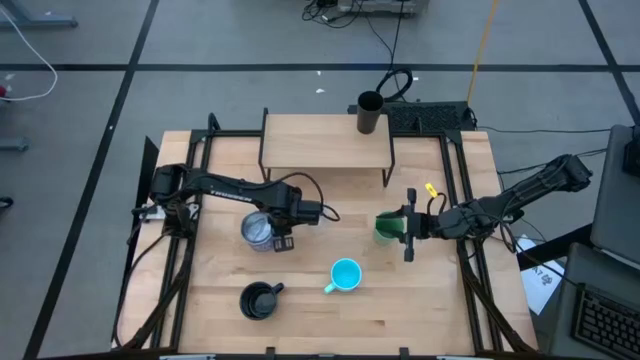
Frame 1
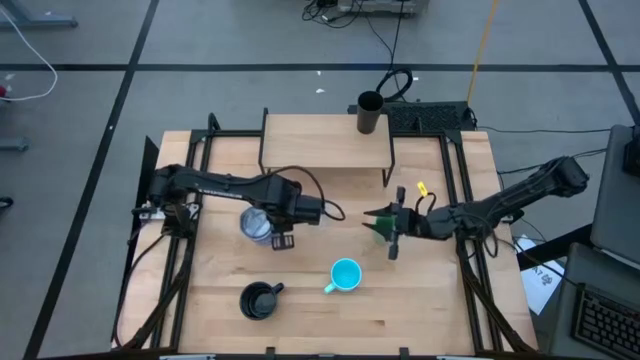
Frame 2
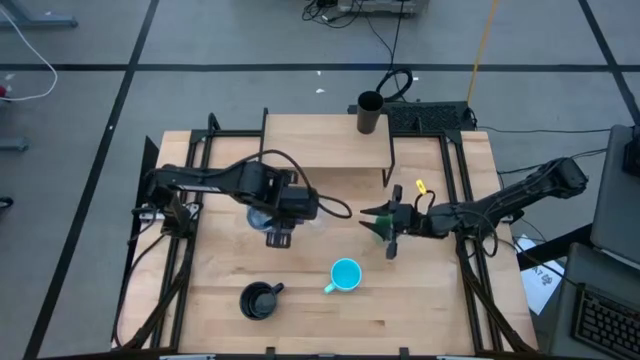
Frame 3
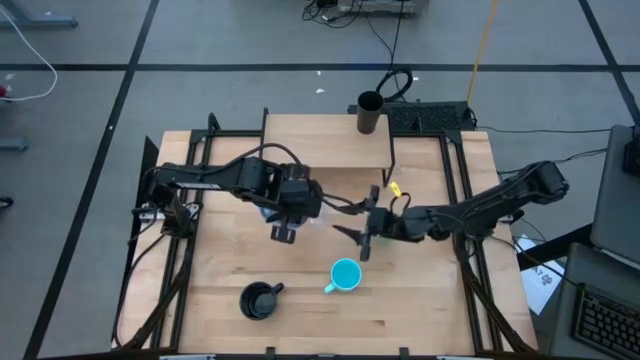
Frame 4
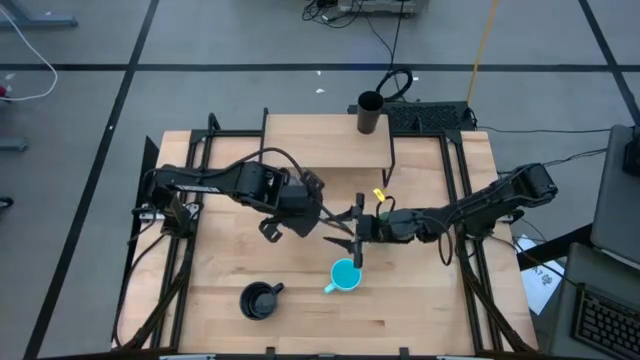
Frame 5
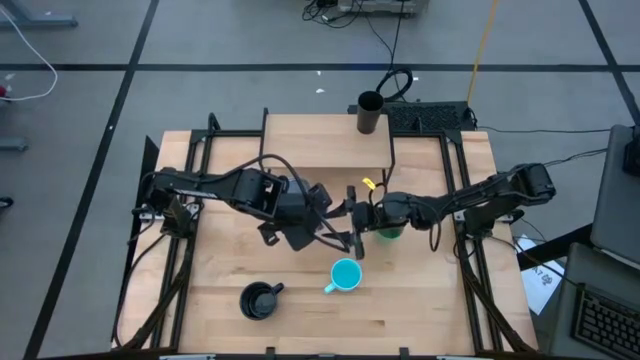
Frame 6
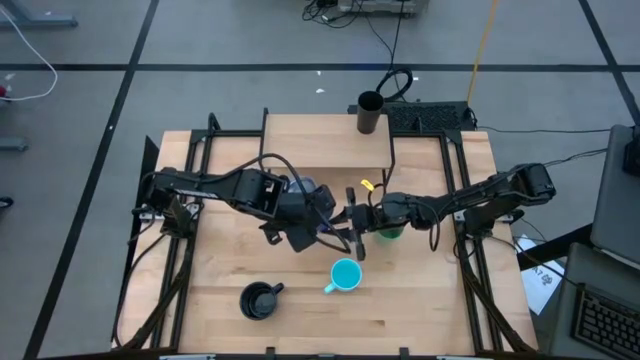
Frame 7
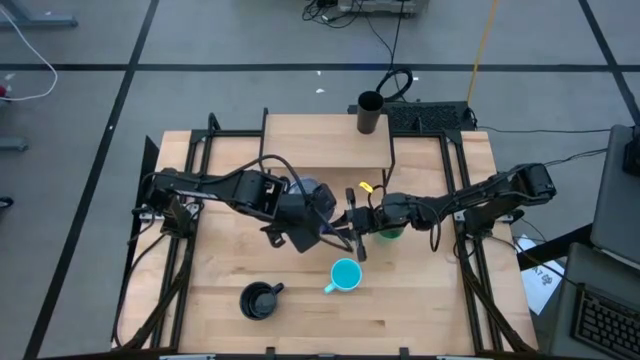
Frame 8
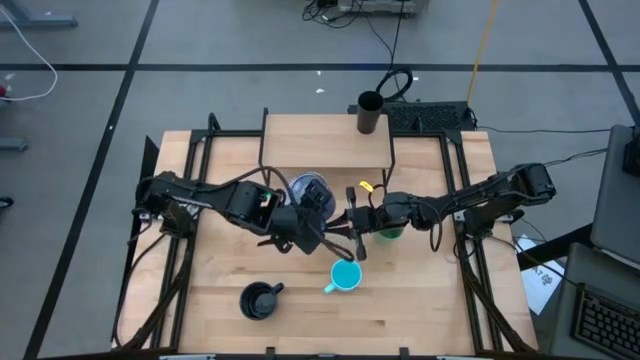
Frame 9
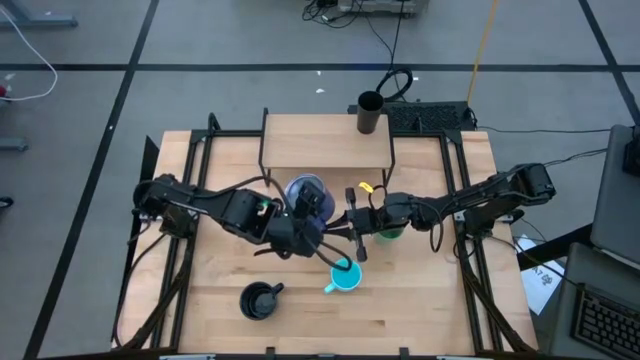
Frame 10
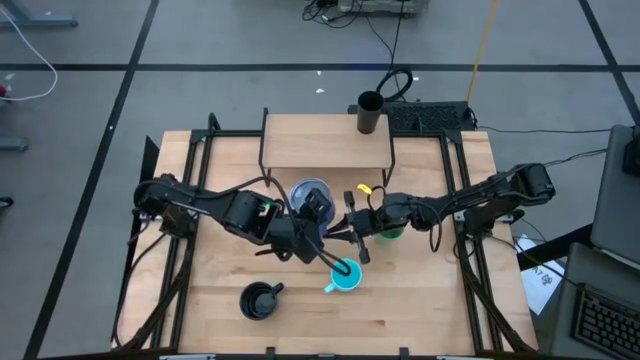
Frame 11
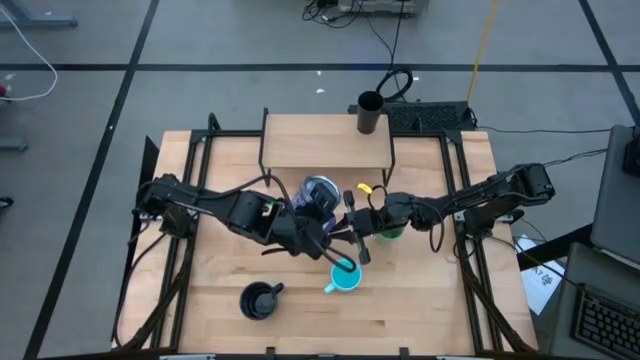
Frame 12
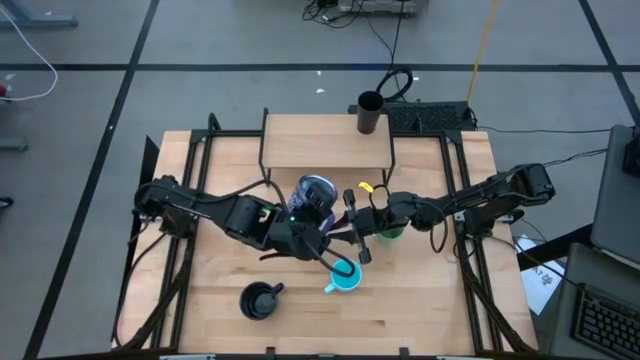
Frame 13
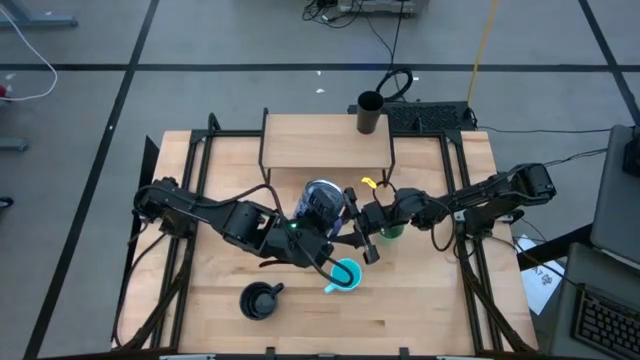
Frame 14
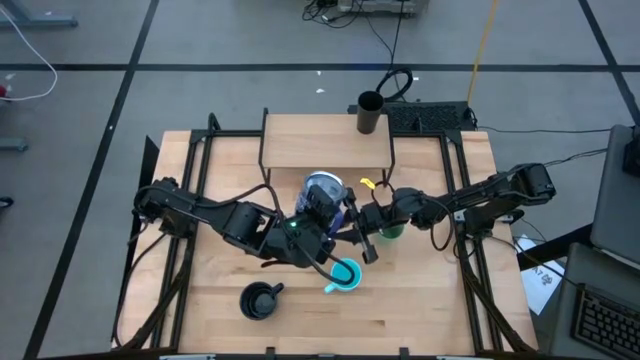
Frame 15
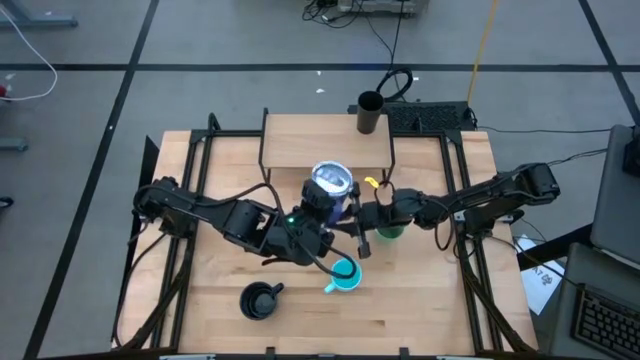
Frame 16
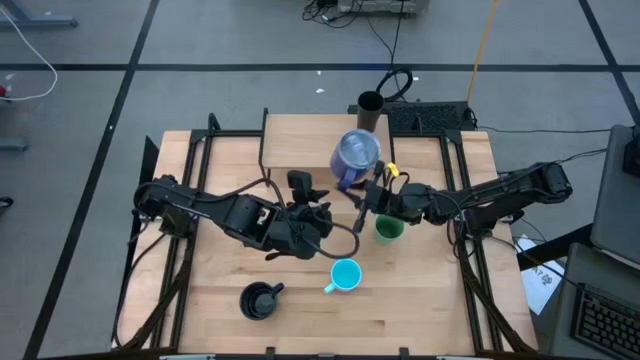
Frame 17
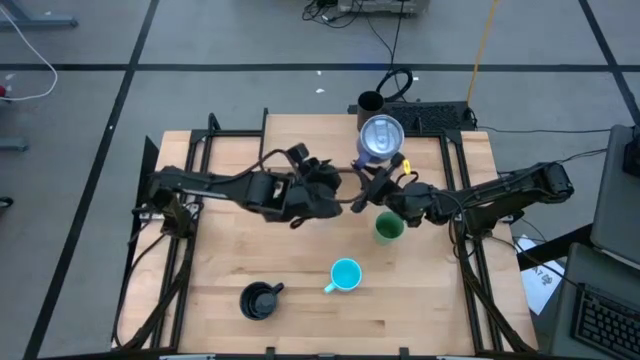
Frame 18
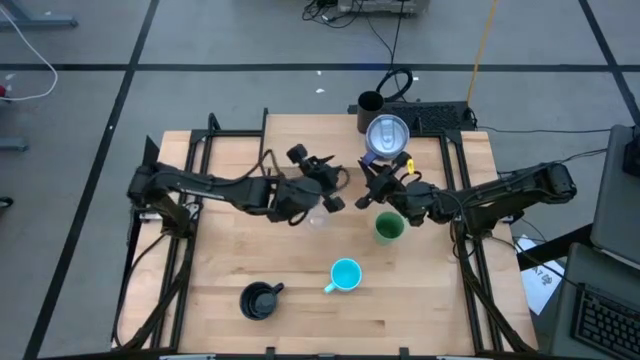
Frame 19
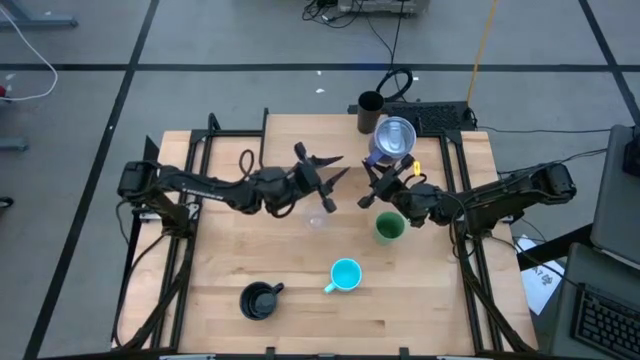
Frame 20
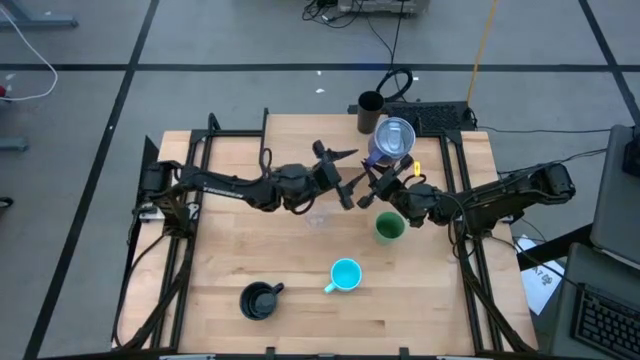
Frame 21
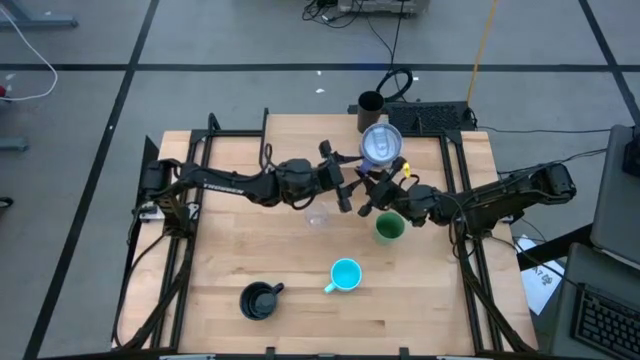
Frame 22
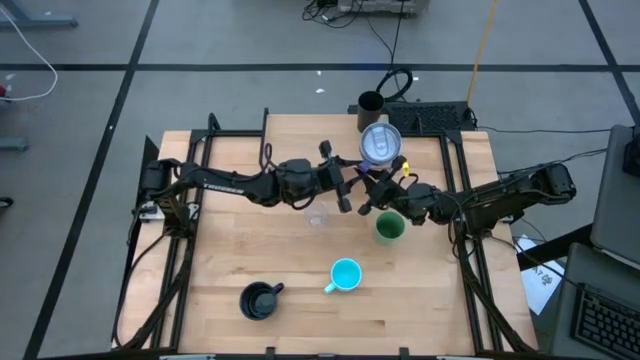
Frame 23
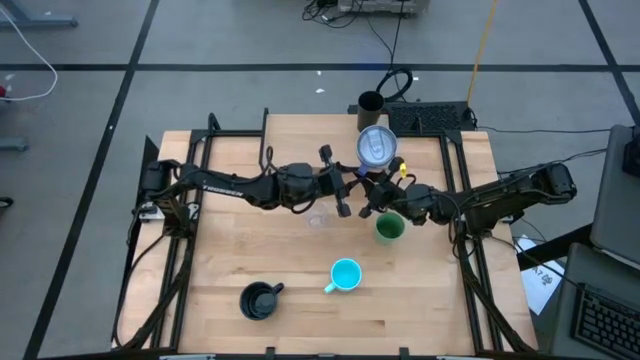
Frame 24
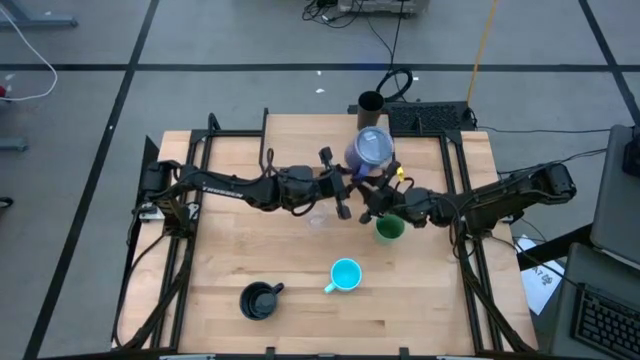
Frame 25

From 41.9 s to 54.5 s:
Task: Stack small to large cups/mugs on shelf
Put the blue mug on the shelf

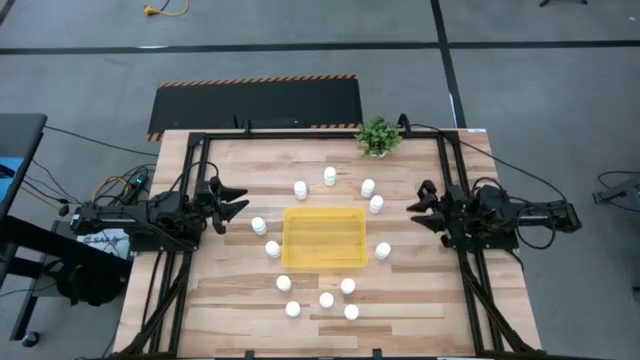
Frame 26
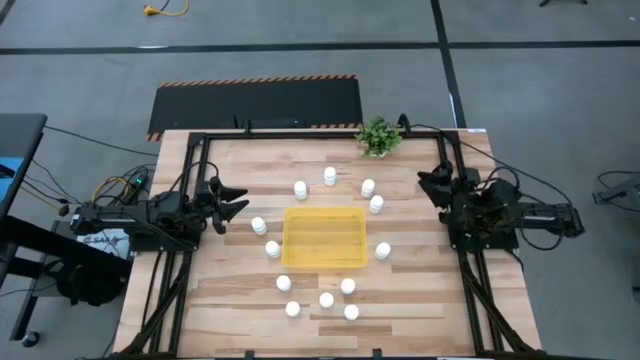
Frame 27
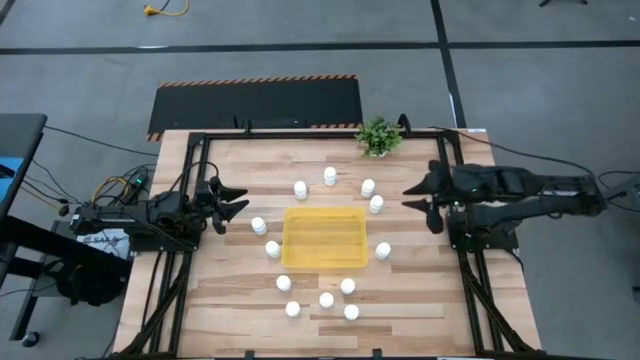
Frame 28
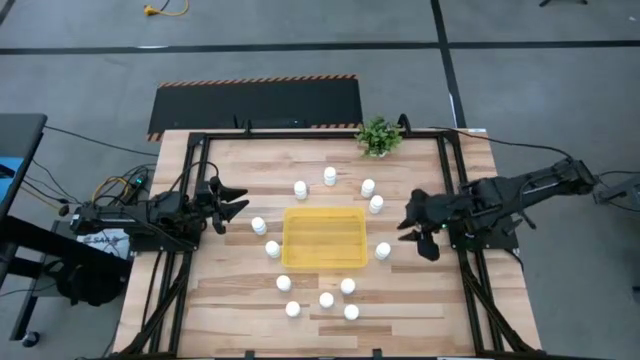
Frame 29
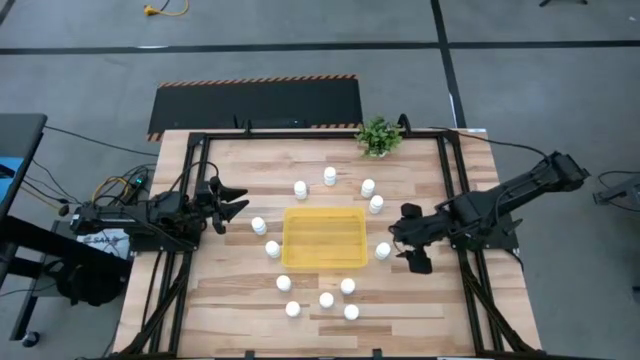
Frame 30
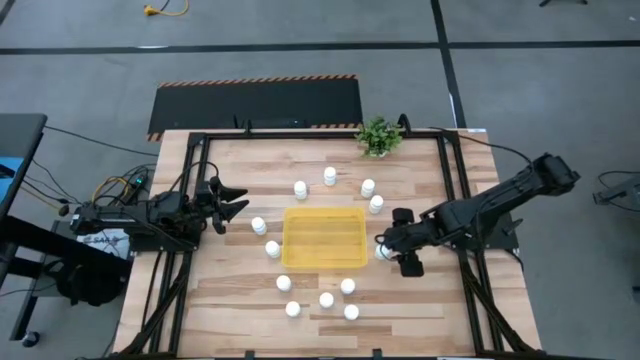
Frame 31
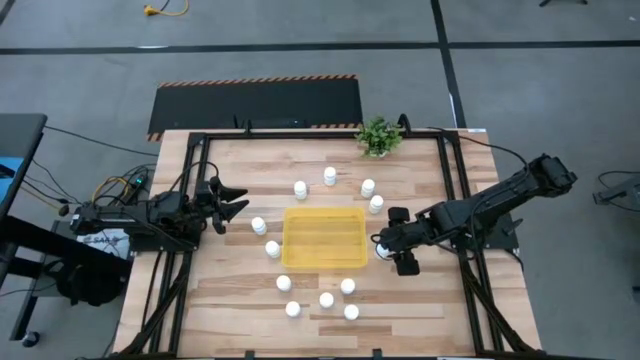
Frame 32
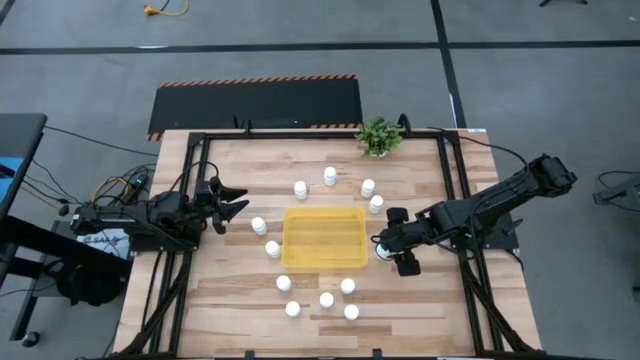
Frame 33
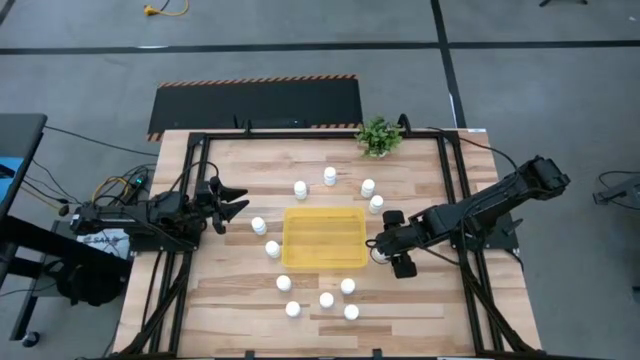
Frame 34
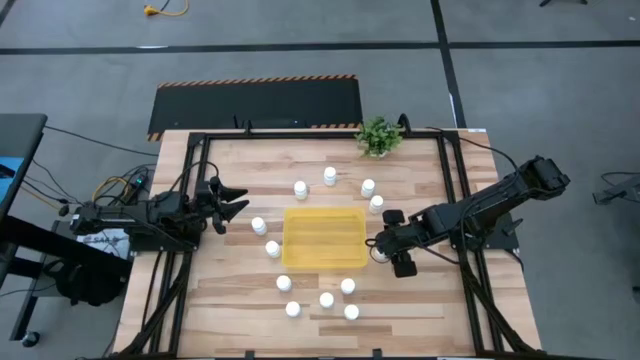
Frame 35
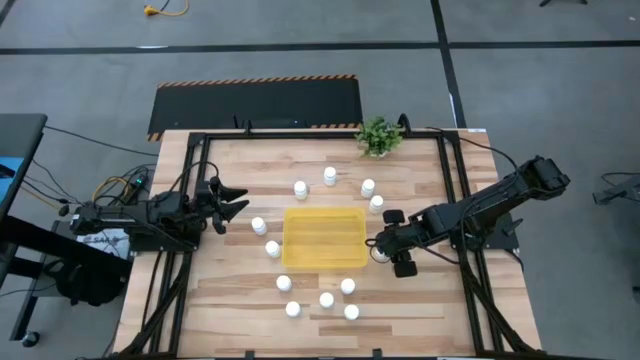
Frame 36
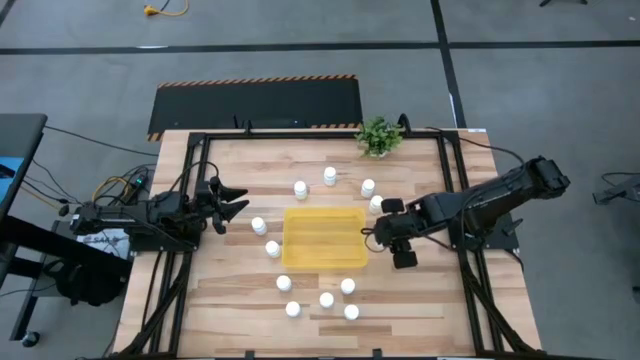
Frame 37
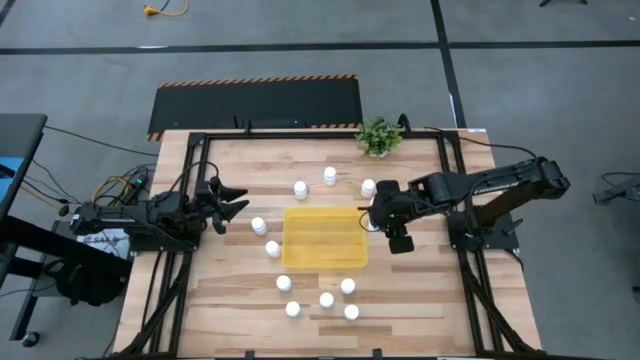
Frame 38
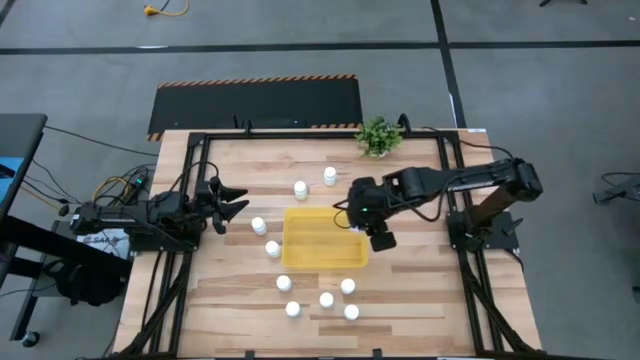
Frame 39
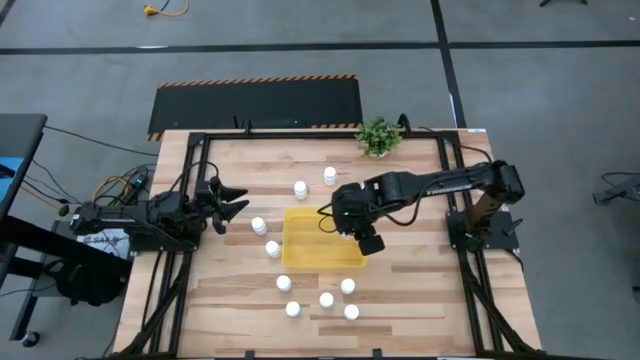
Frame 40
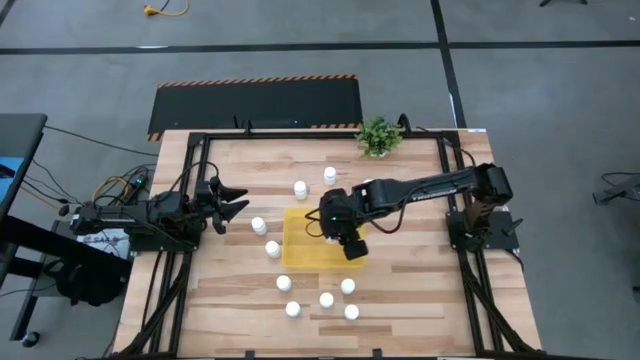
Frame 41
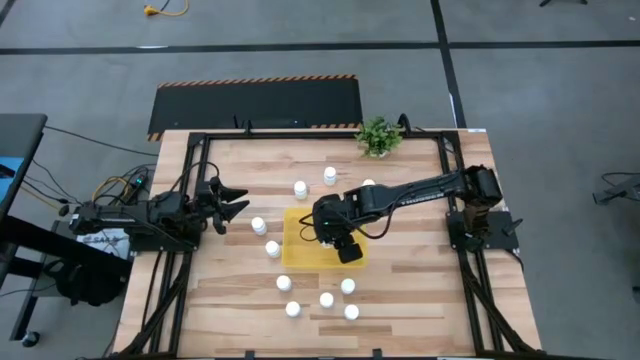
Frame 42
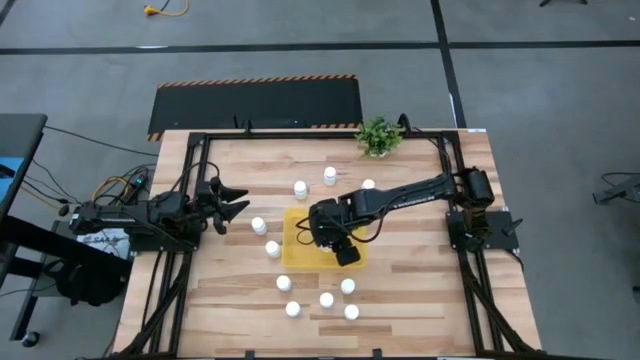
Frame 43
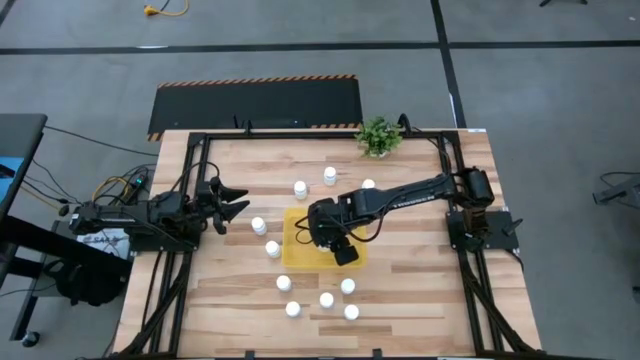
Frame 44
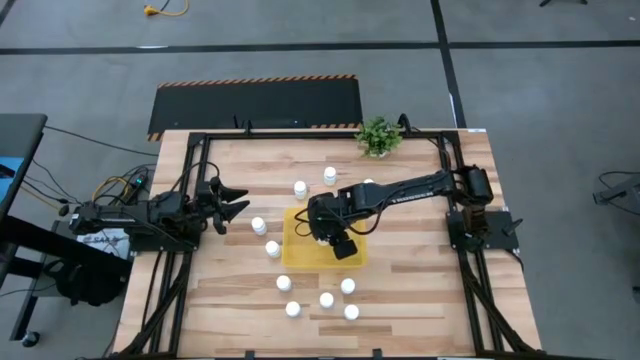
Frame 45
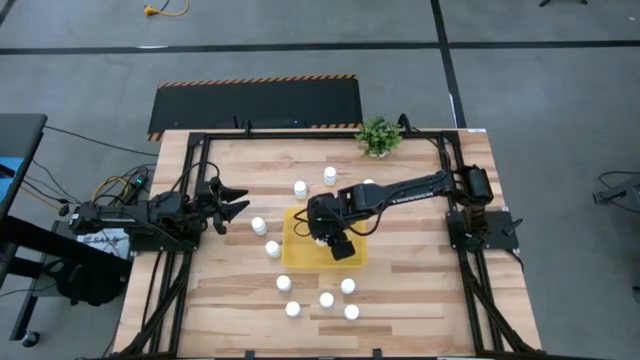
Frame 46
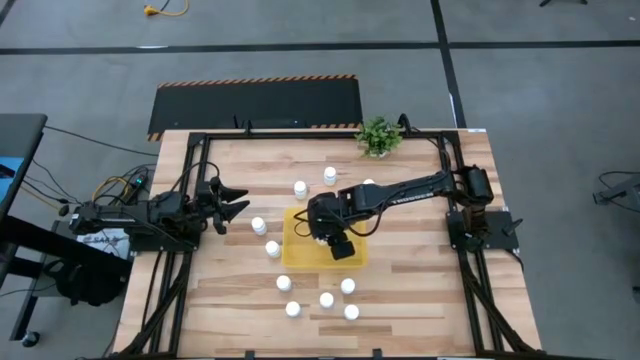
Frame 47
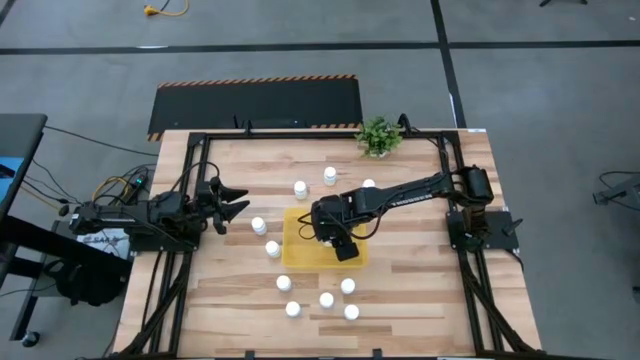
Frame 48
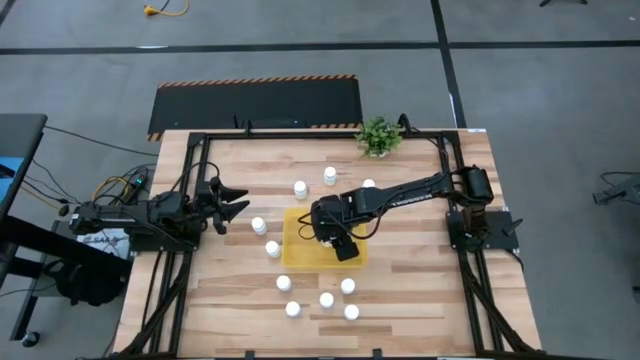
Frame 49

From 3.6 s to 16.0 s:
Task: Pick and place pill bottles into a basket
Put the white pill bottle into the yellow bin
